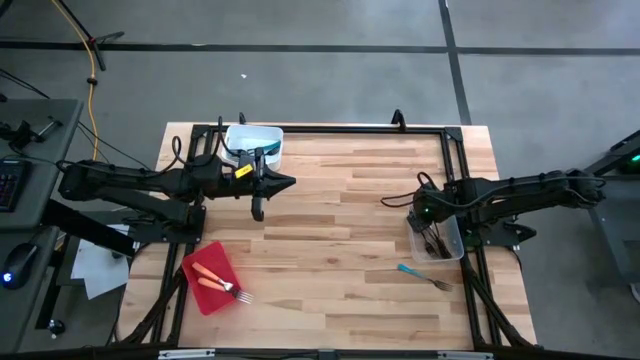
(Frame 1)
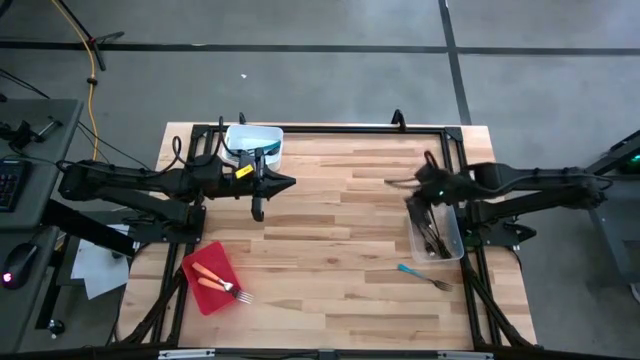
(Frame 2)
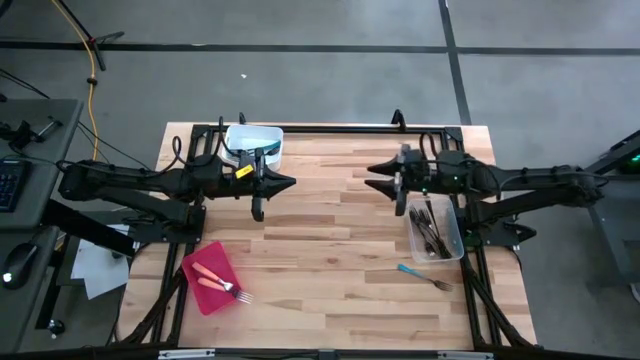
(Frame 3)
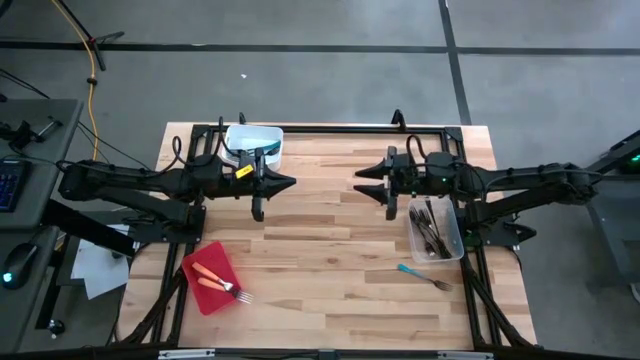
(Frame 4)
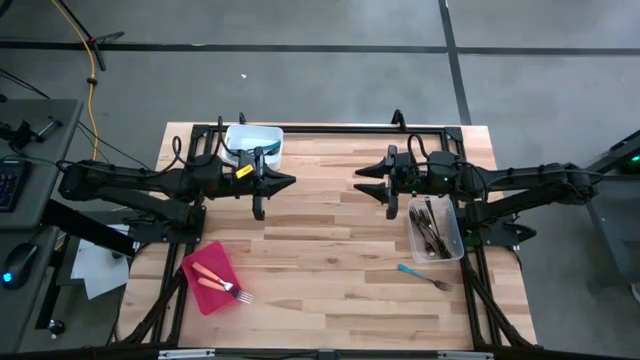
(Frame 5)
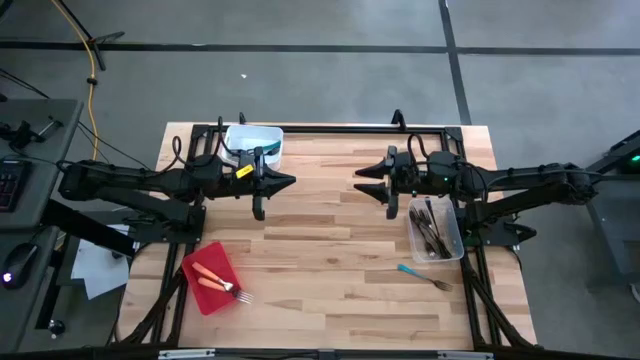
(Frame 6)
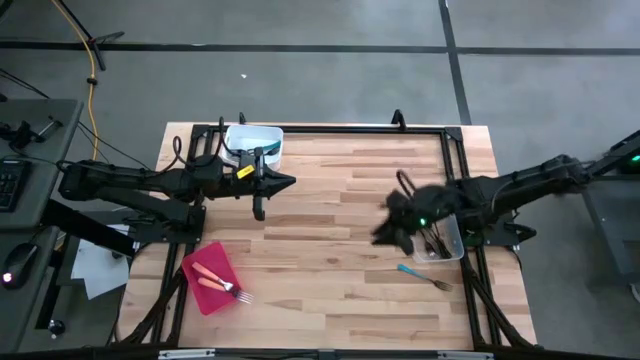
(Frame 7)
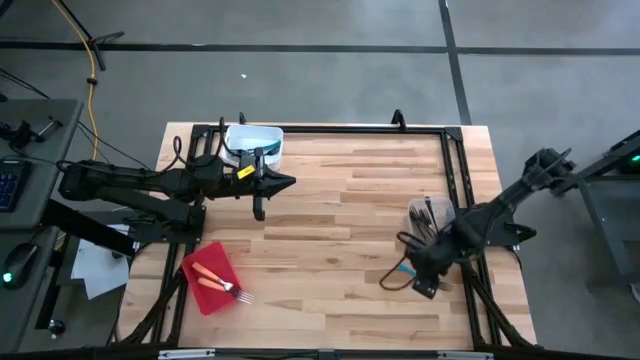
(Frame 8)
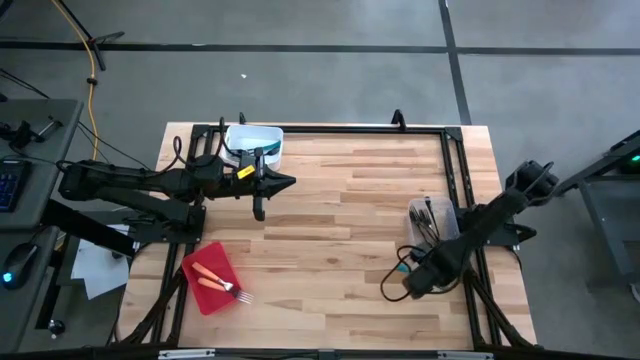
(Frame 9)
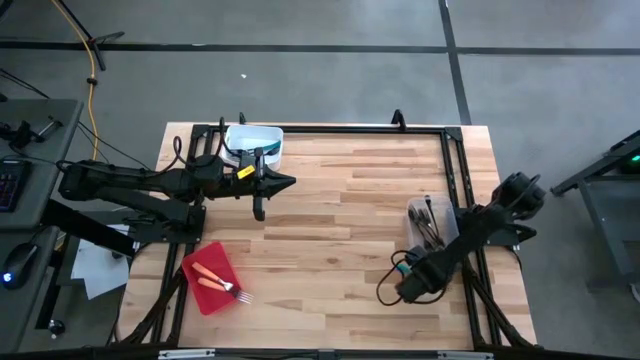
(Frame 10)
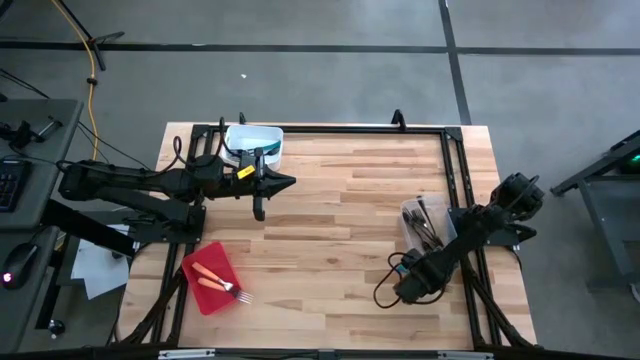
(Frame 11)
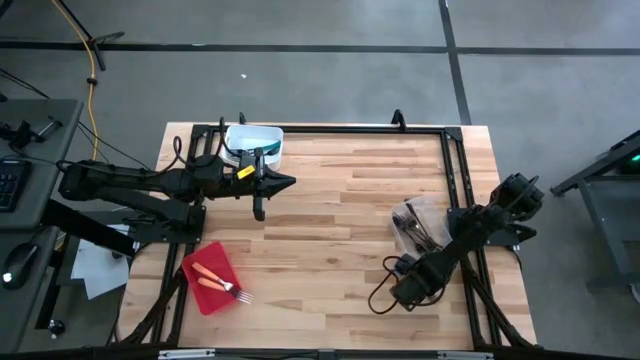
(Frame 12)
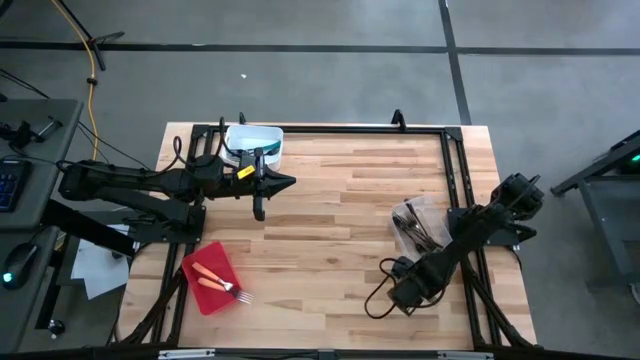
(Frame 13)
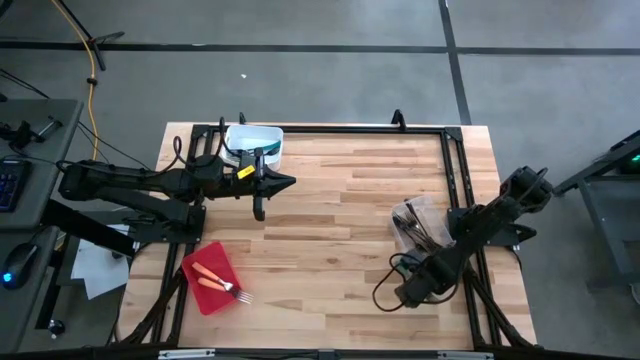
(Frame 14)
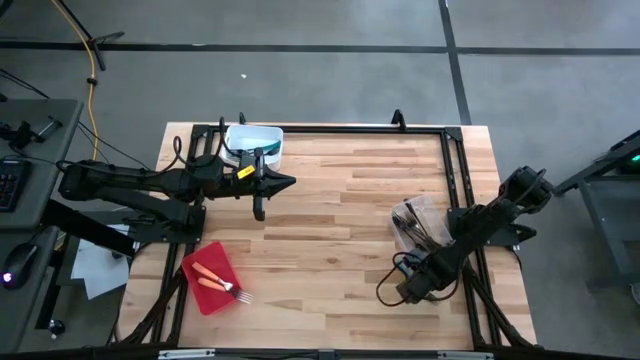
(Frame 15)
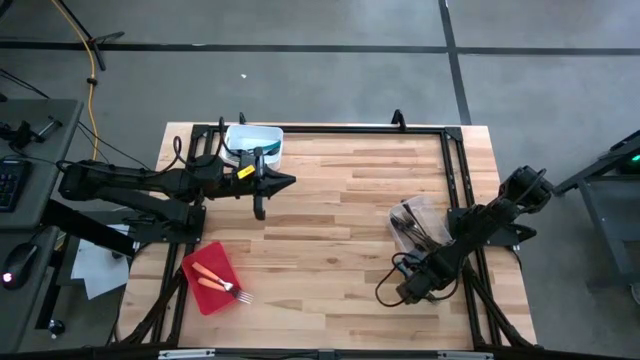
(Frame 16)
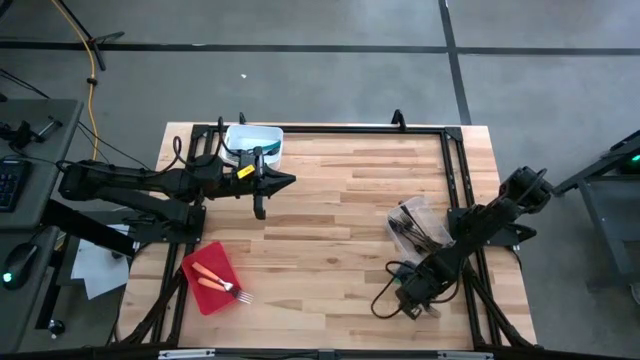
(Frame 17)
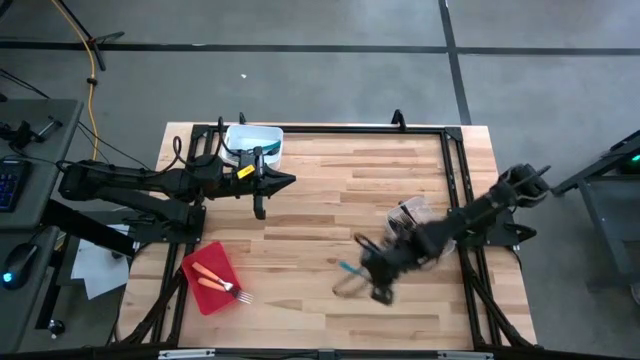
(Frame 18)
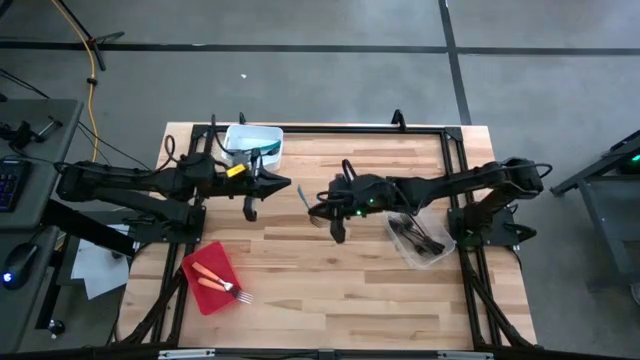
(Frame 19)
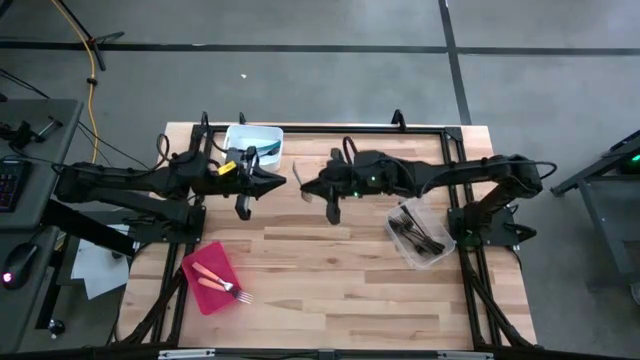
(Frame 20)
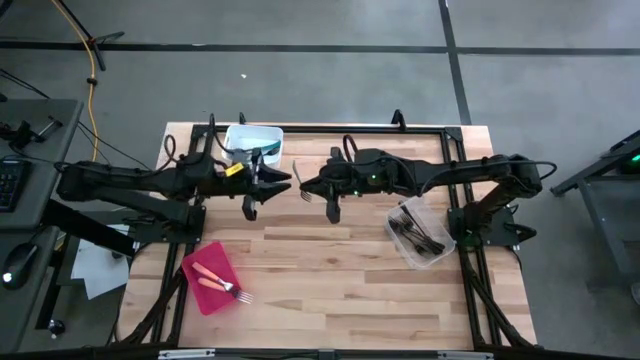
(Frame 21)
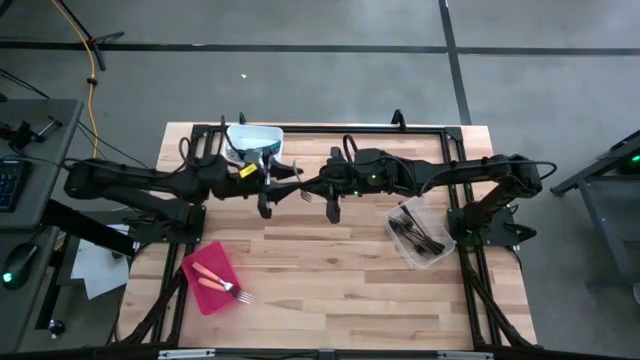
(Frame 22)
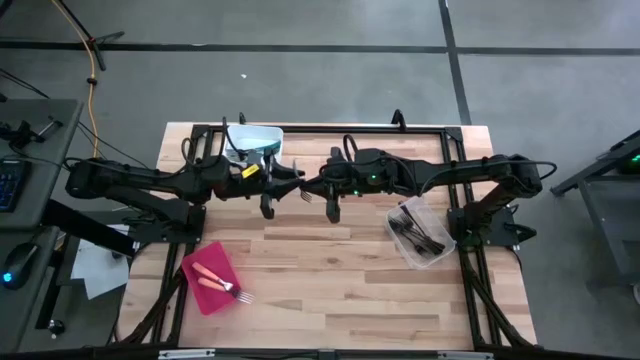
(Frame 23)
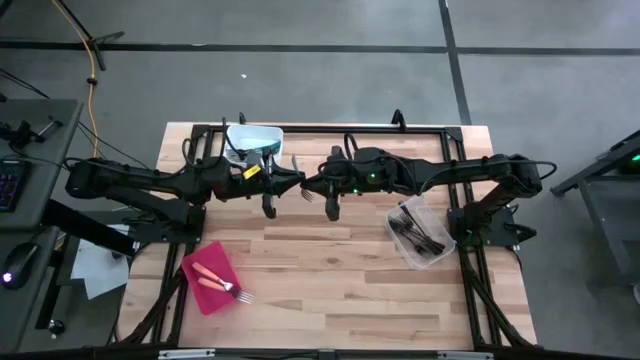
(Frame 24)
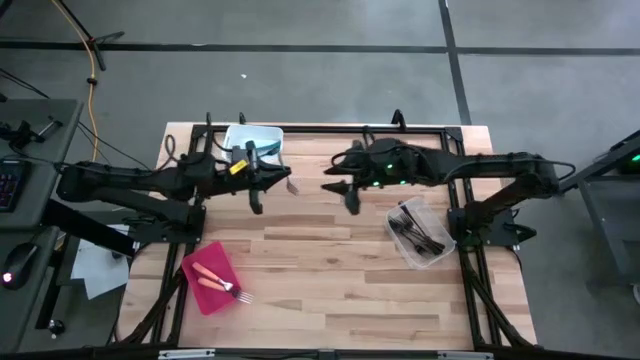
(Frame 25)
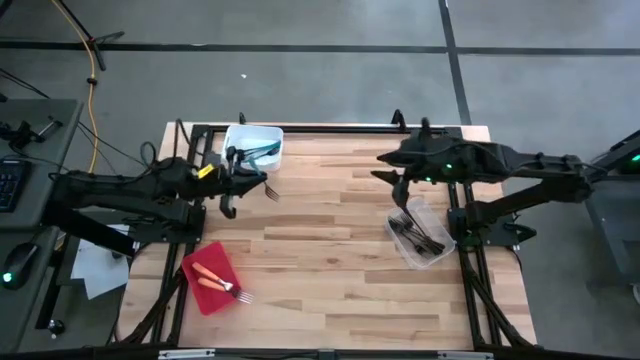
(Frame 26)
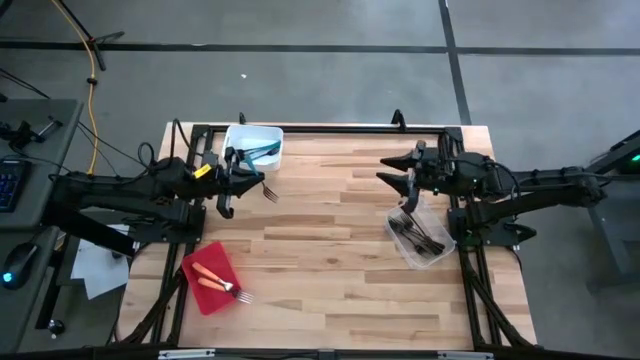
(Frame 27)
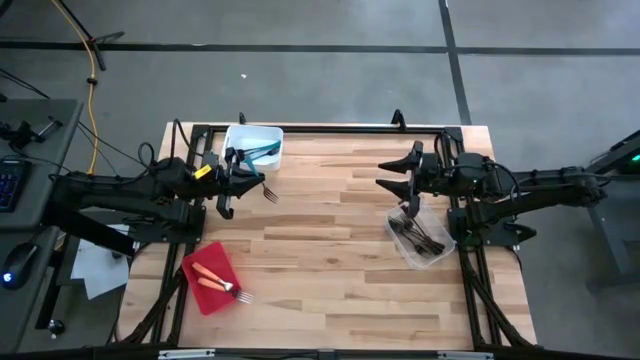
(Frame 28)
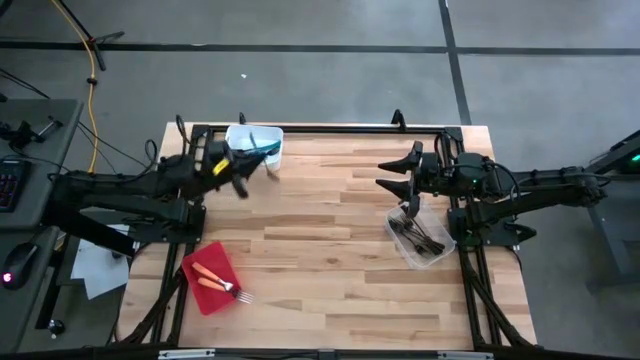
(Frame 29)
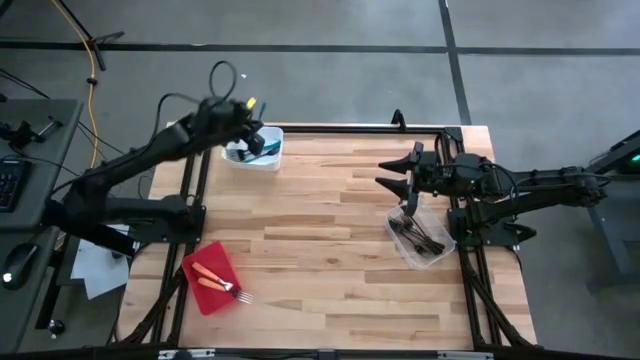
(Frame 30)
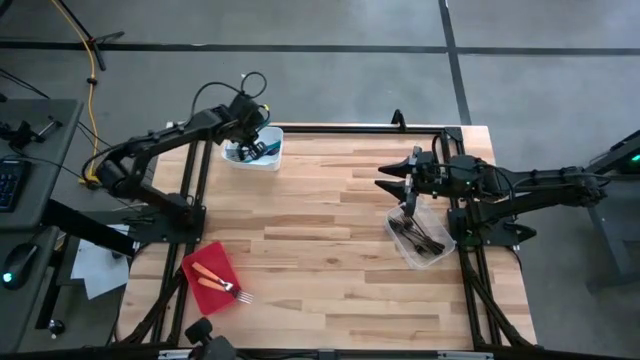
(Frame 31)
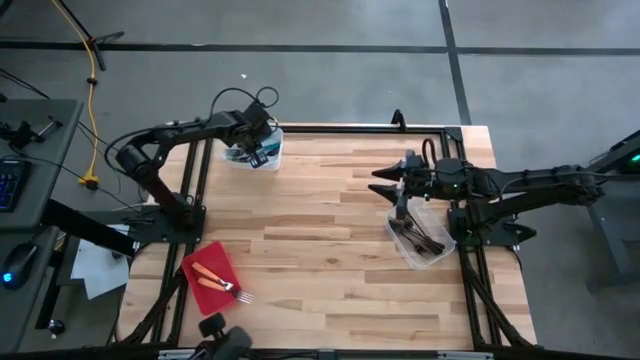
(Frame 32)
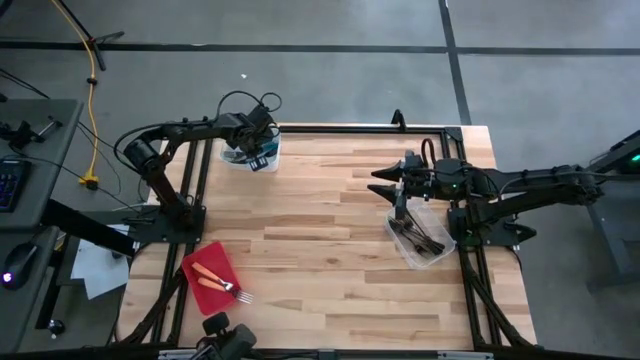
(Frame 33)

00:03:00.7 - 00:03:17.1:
Task: Sort silverware by color (type)
Put the blue fork into the white bin

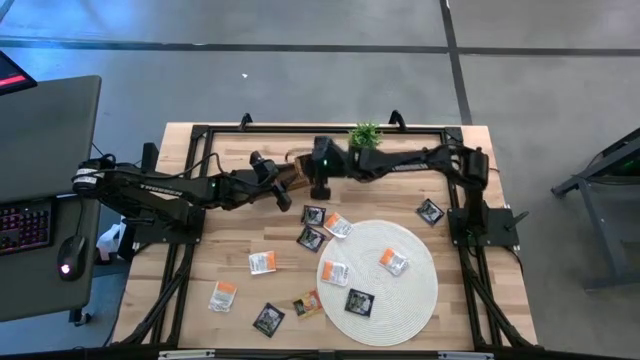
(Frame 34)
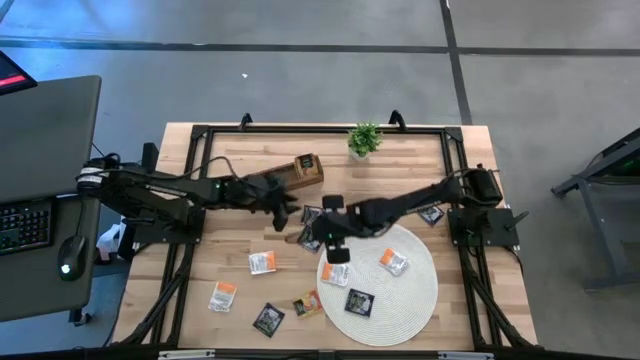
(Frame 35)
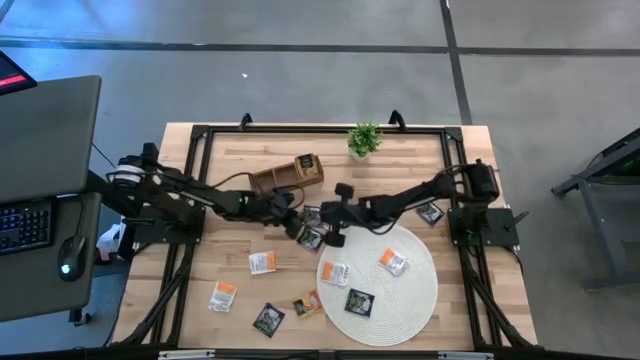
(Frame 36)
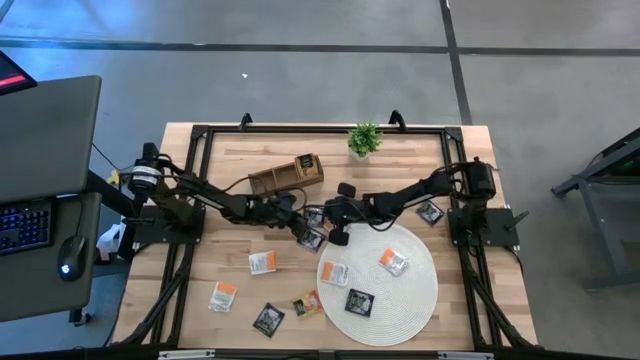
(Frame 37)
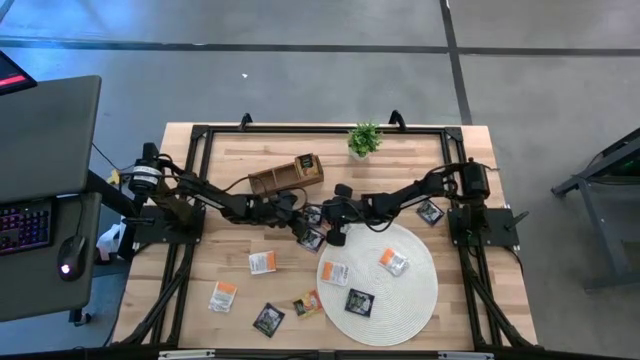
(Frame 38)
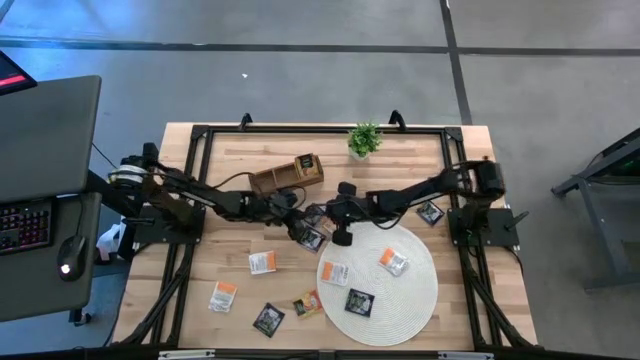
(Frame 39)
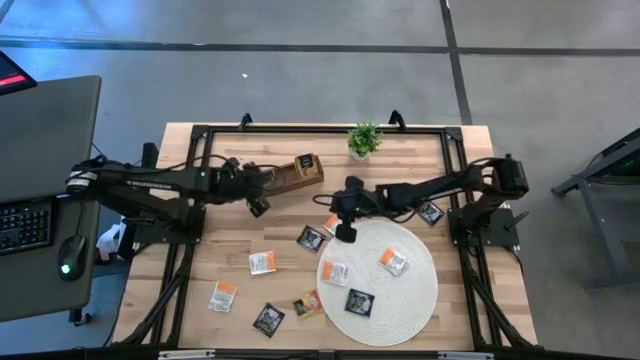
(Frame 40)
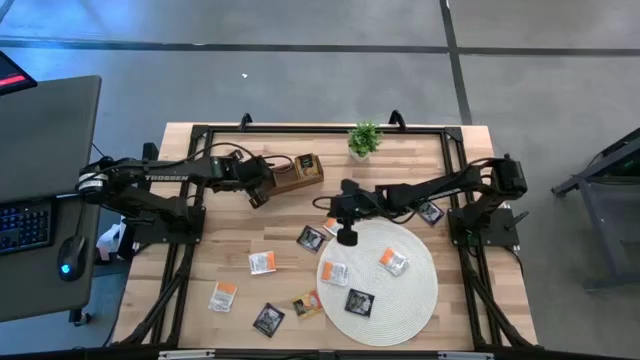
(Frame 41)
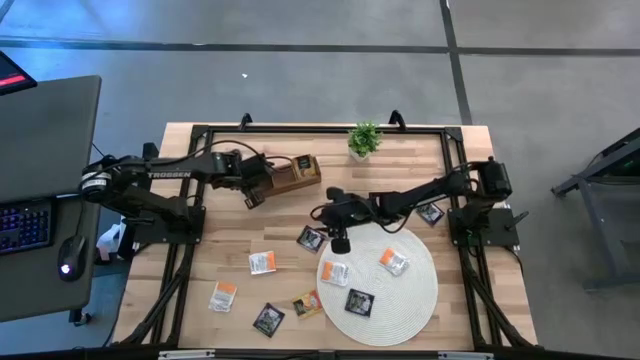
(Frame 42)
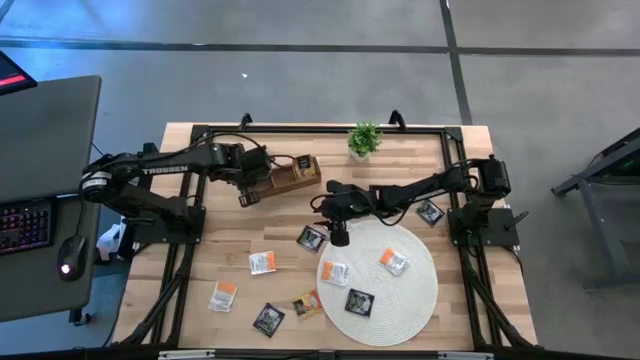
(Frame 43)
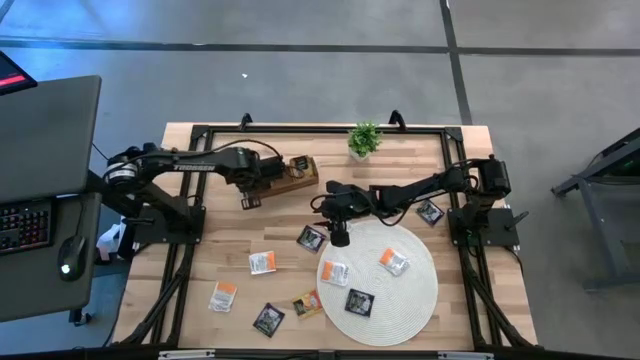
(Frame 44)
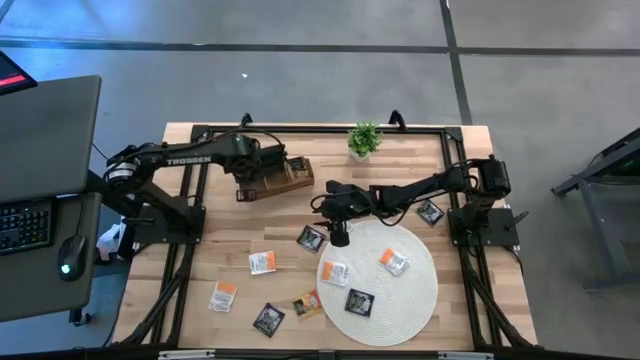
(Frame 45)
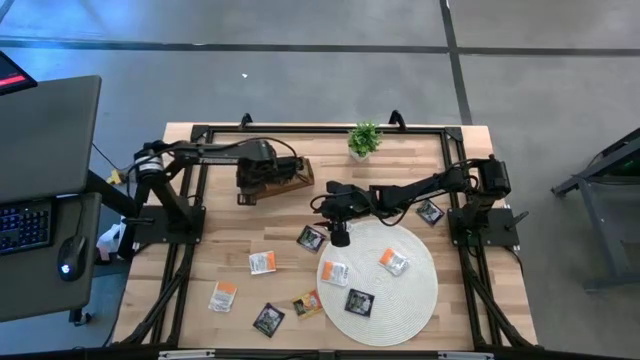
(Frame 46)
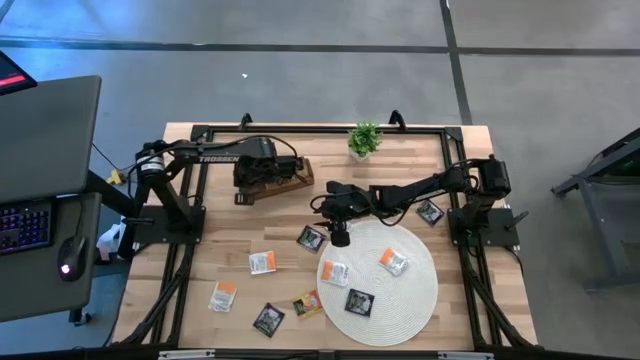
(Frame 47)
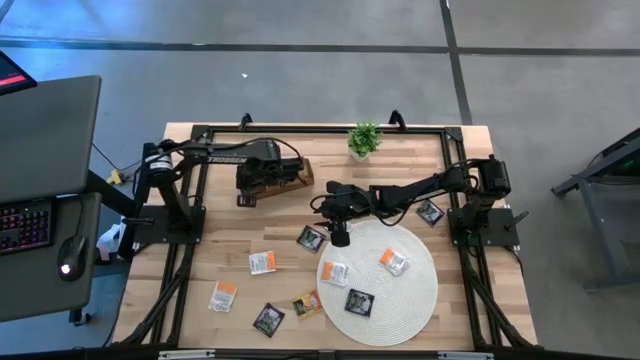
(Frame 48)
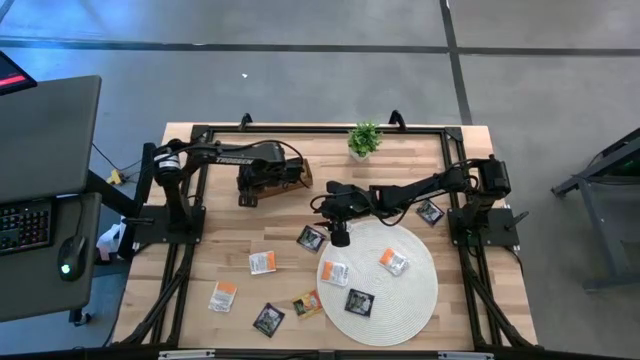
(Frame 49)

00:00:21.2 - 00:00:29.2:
Task: Pick & Place Tea
Put the violet tea bag into the left section of the wooden organizer
